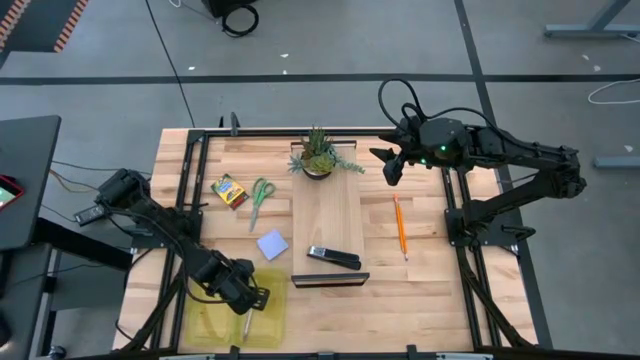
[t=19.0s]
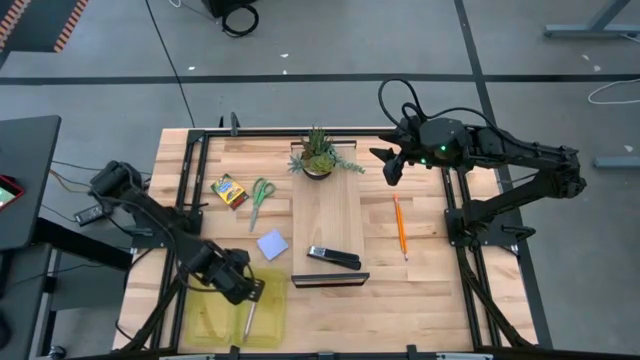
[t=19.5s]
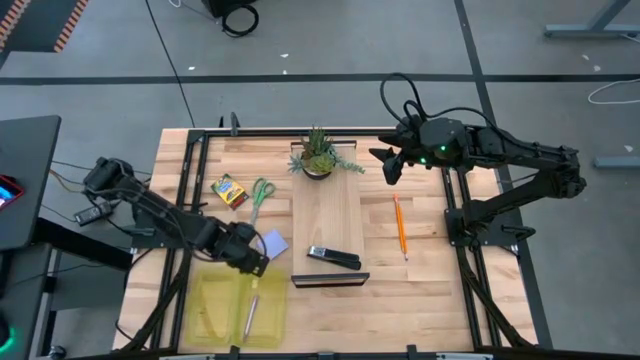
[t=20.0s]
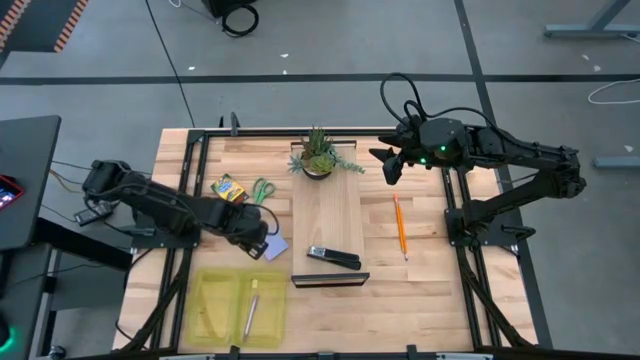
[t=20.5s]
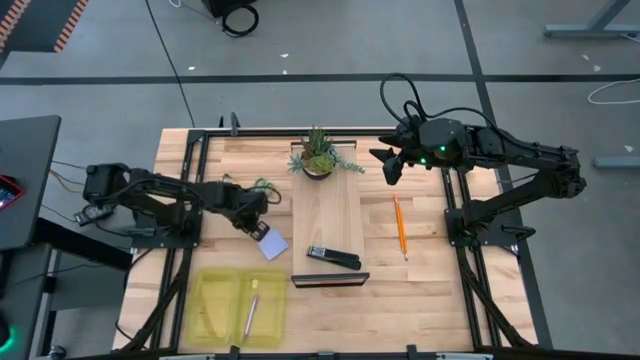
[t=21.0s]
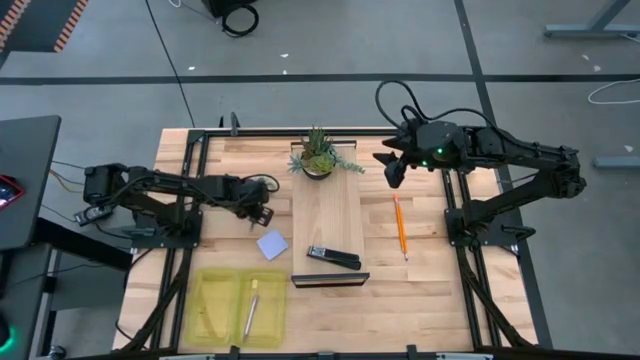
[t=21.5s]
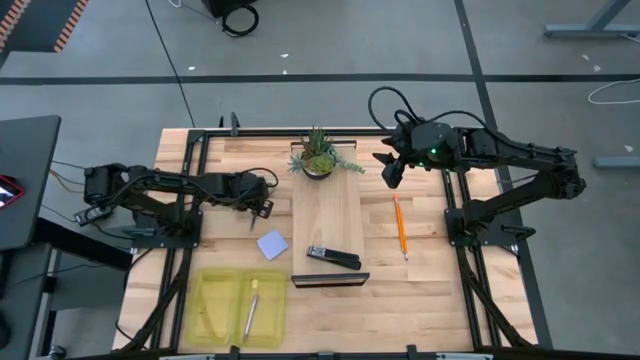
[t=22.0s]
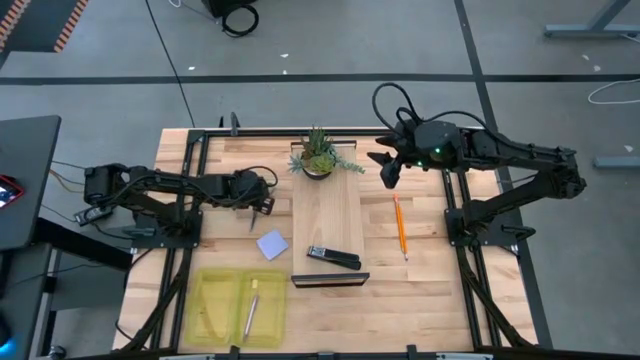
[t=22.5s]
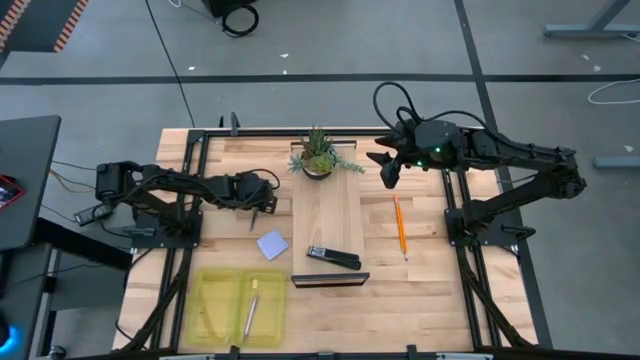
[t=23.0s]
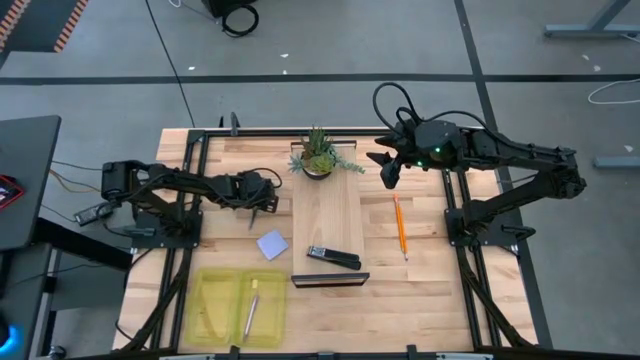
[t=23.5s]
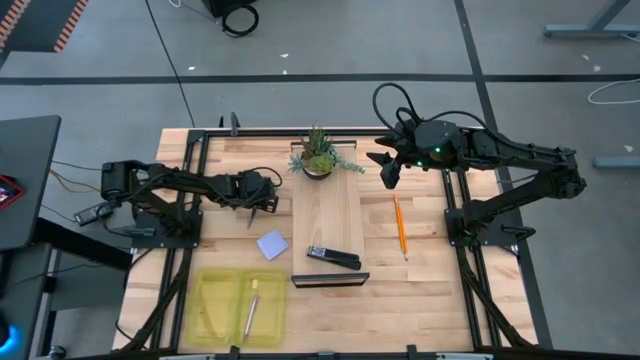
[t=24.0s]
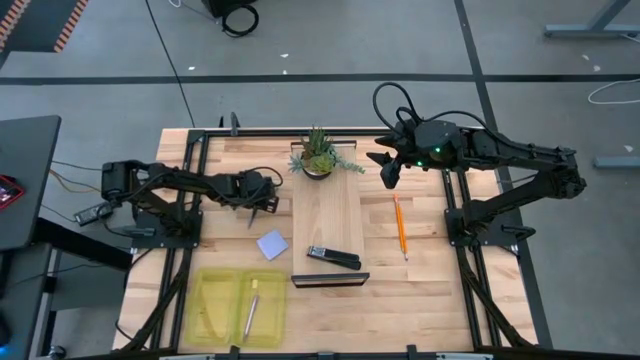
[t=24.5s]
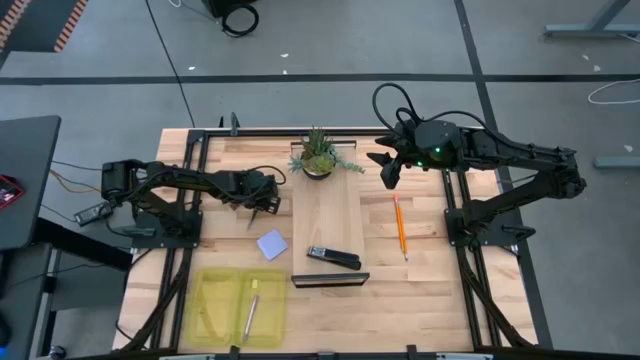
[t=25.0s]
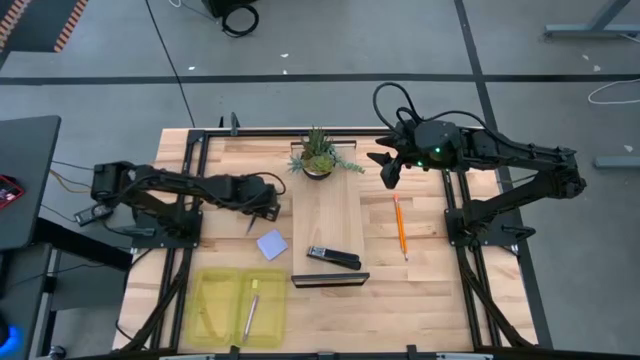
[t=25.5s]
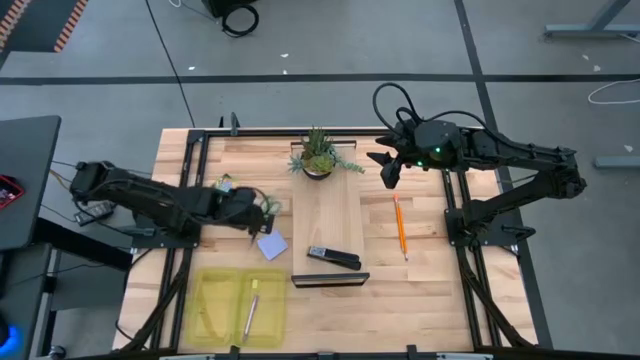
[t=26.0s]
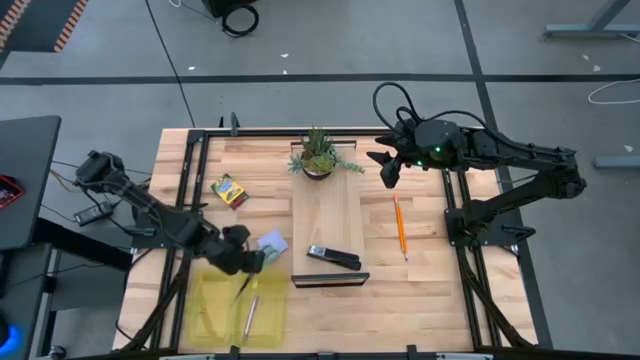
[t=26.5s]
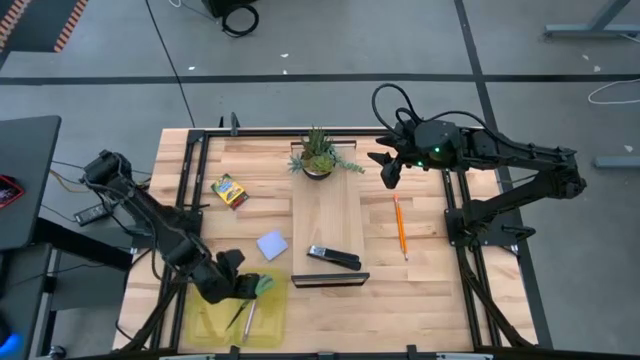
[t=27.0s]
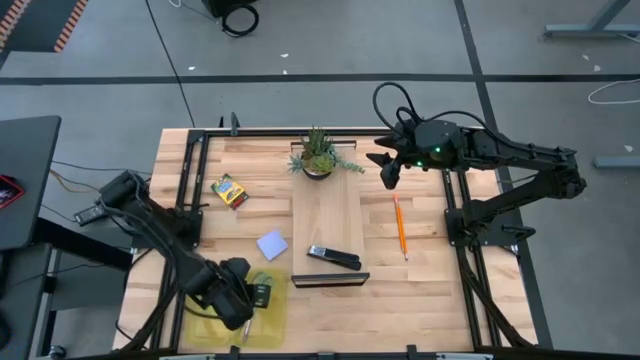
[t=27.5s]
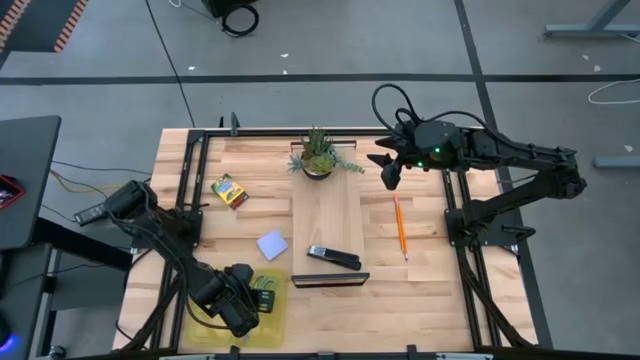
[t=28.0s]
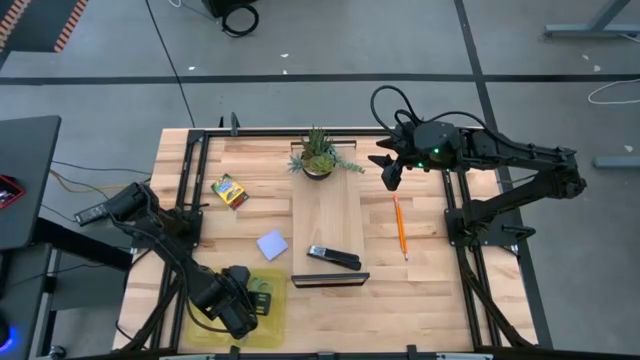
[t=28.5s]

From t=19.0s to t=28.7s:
Task: Pack school essentials
Put the scissors into the supply box

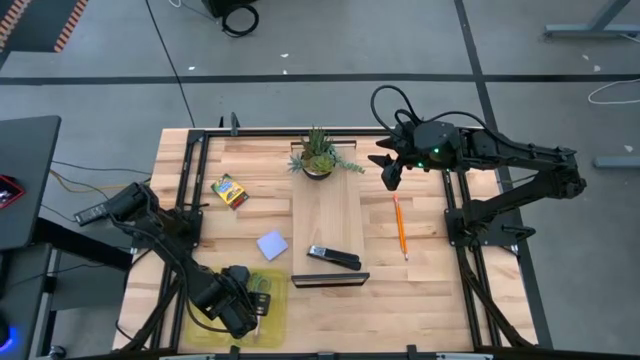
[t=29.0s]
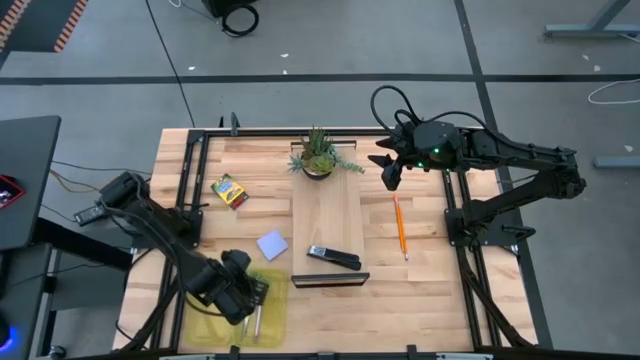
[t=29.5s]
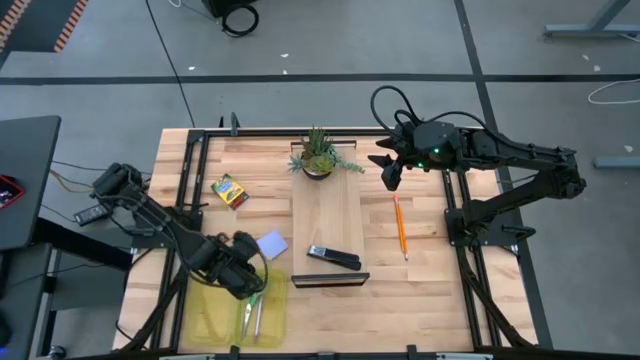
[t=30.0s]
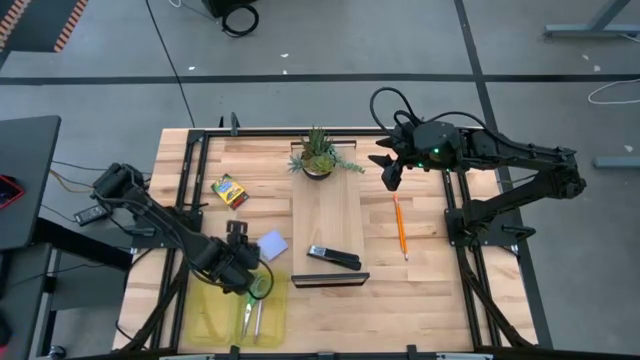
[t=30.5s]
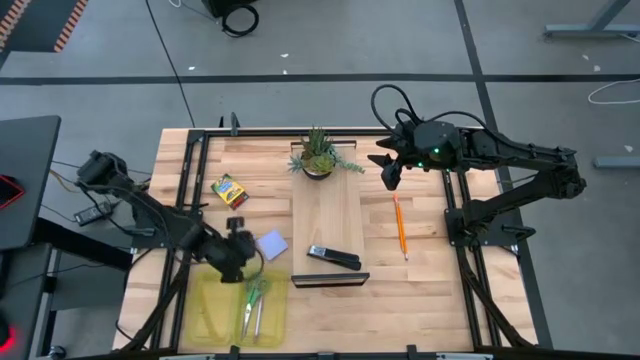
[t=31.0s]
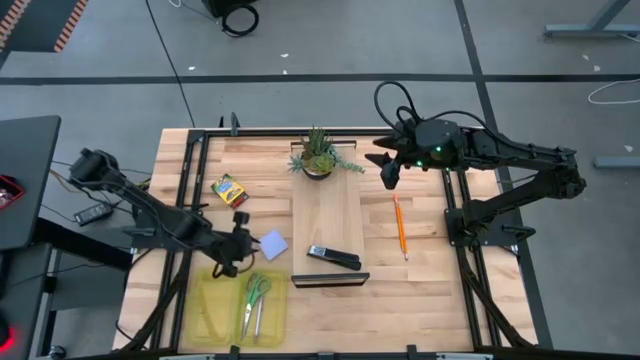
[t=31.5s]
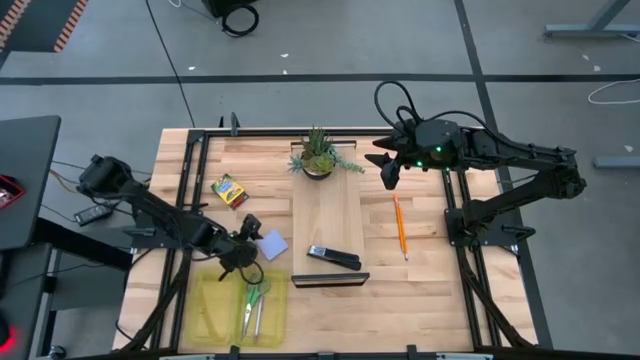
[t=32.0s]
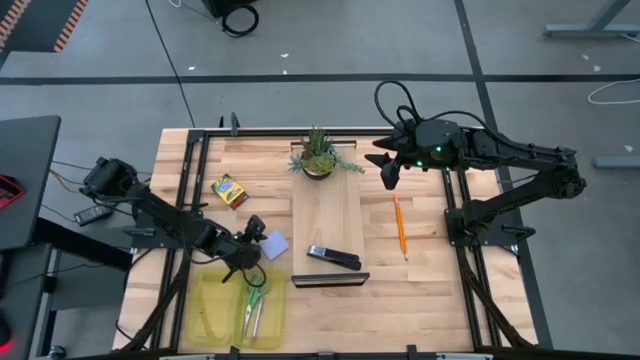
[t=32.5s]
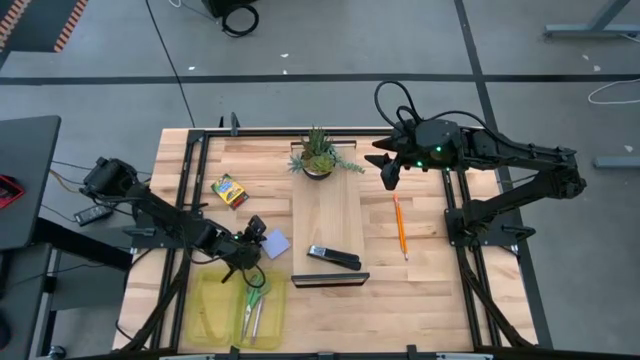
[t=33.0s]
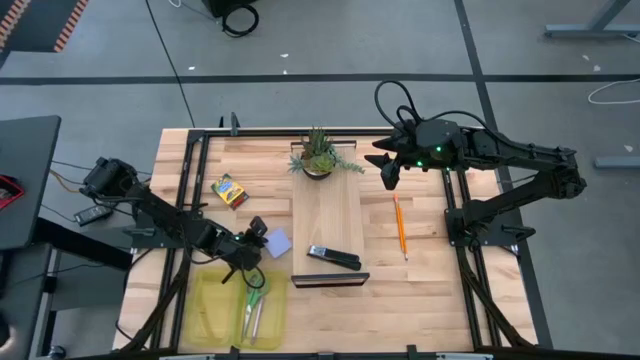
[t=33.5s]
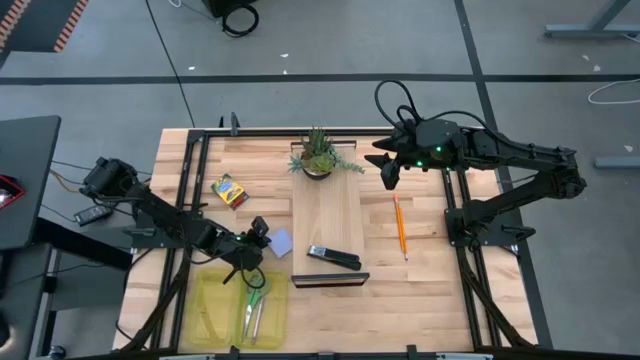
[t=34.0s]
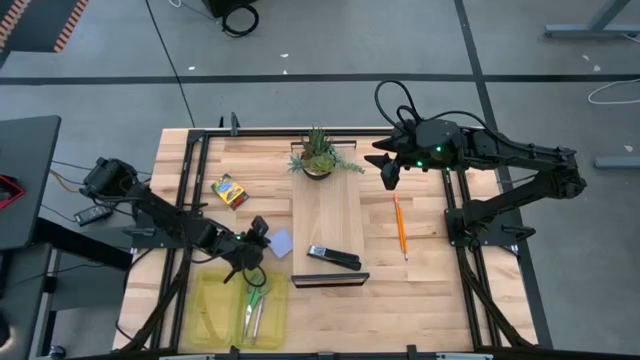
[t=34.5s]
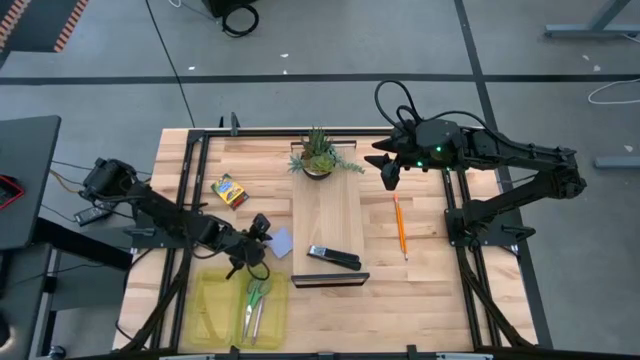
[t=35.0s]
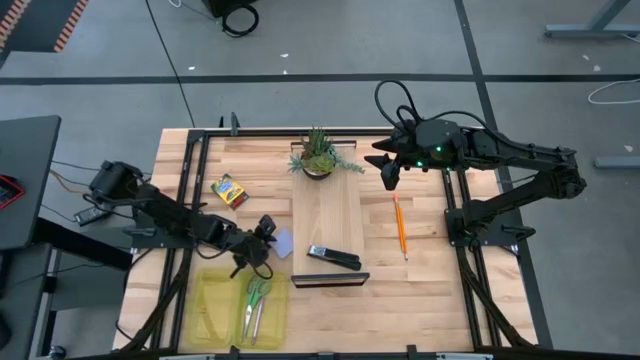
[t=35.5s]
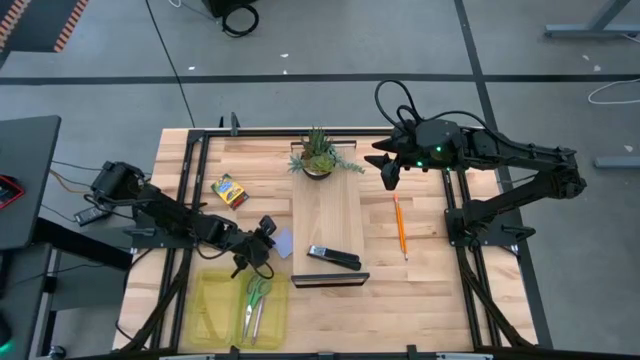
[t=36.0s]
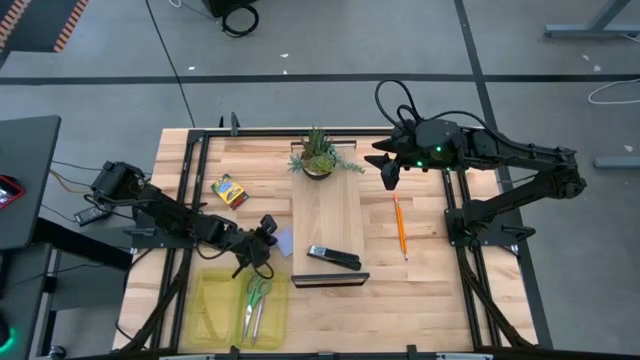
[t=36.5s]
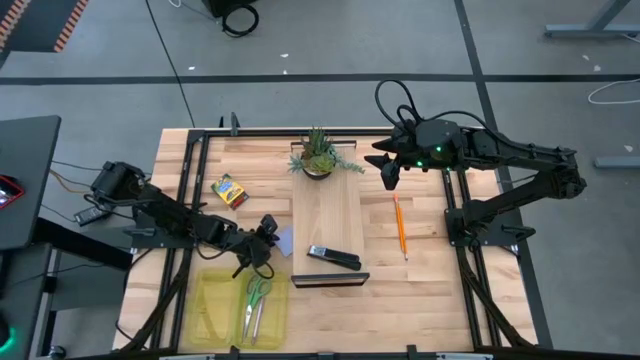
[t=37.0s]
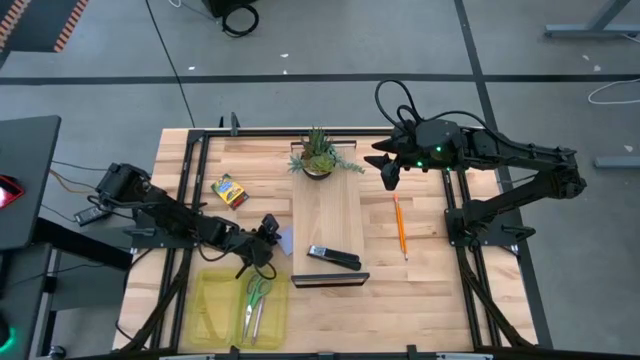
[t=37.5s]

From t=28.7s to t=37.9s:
Put the sticky notes into the supply box
